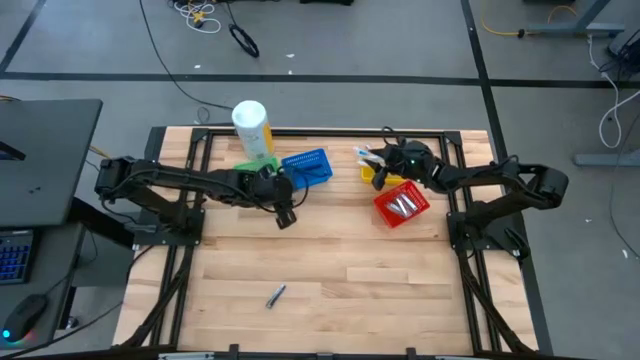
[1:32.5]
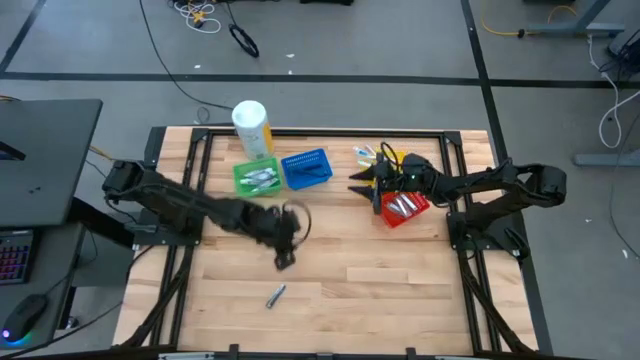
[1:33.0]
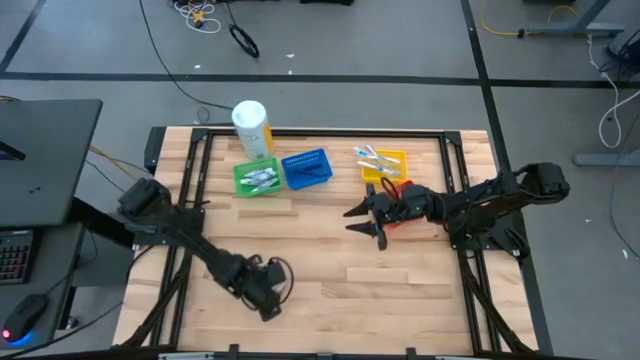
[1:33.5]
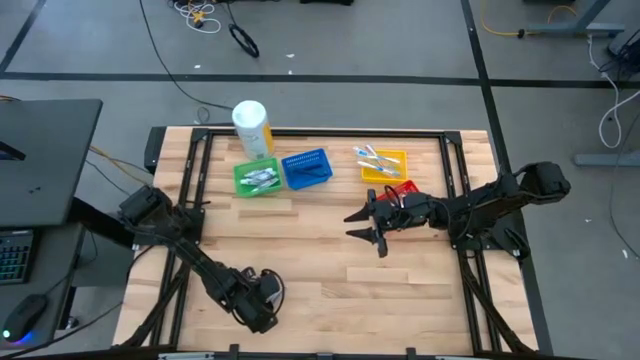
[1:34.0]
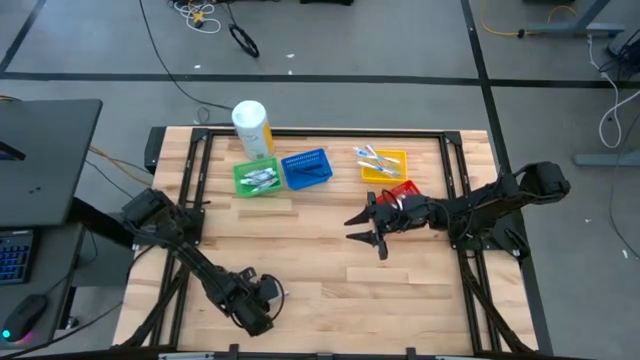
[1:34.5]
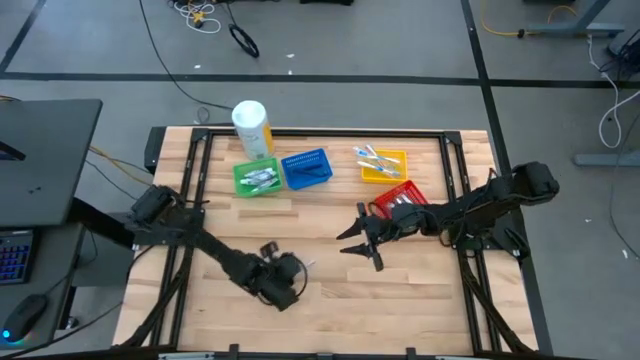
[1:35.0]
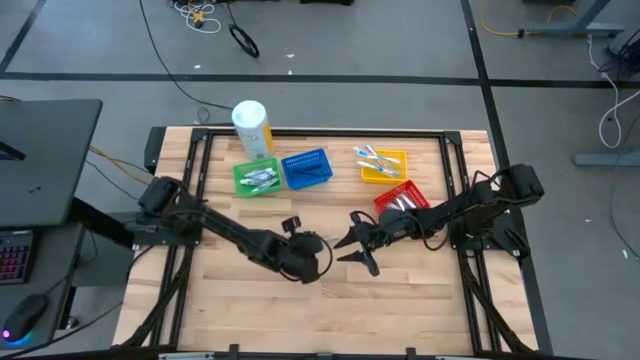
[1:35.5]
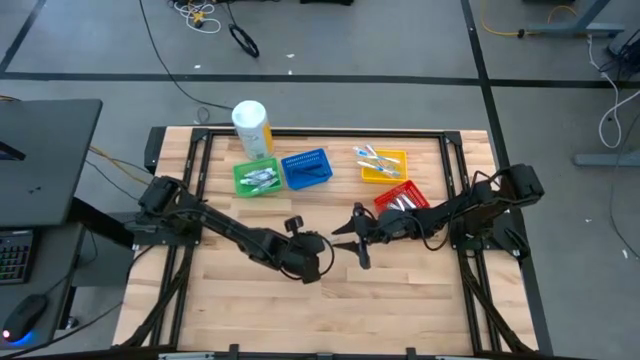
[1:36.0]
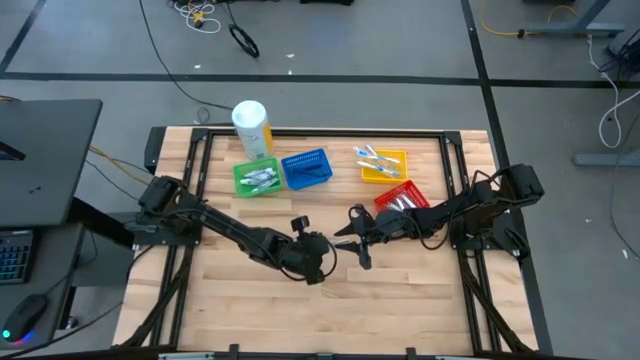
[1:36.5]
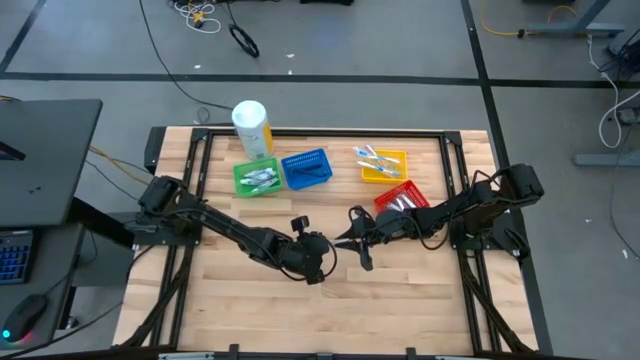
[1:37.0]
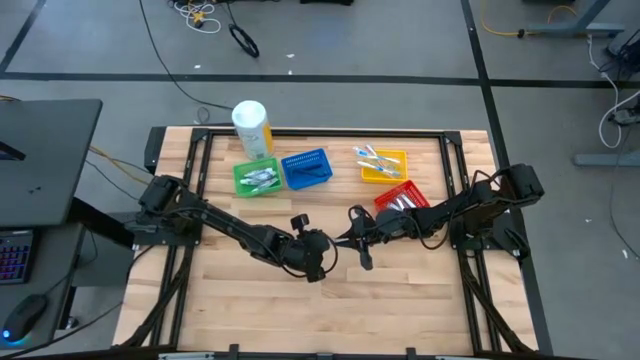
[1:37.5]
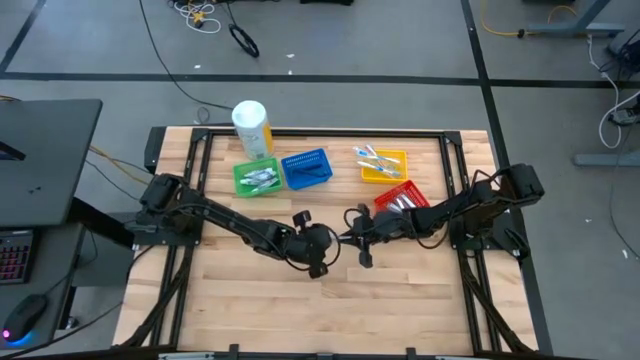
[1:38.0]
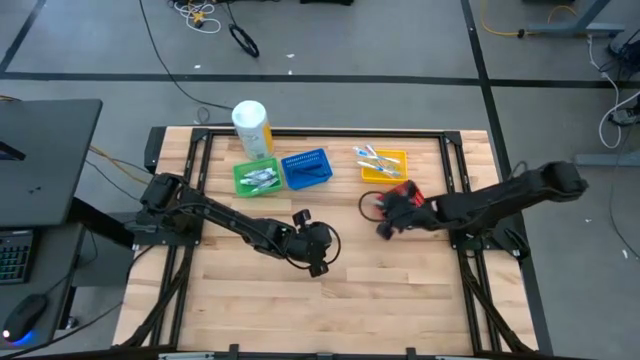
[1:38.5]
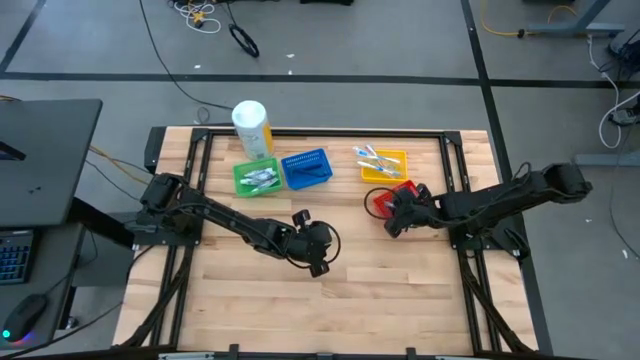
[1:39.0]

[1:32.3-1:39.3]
Task: Pick & Place Travel size toiletries
Put the silver nail cutter into the red bin

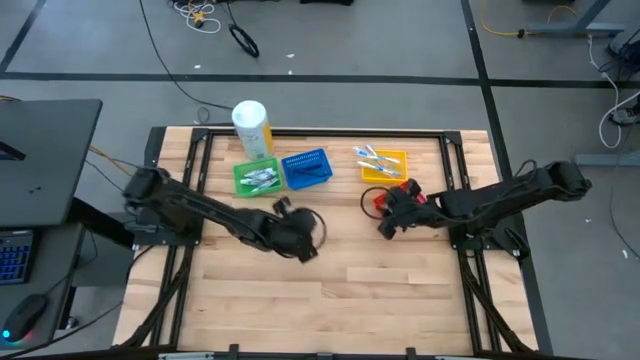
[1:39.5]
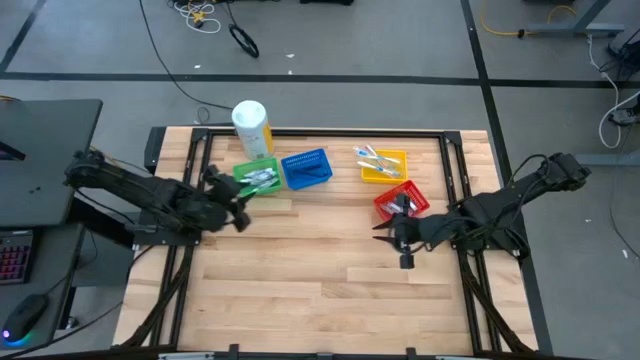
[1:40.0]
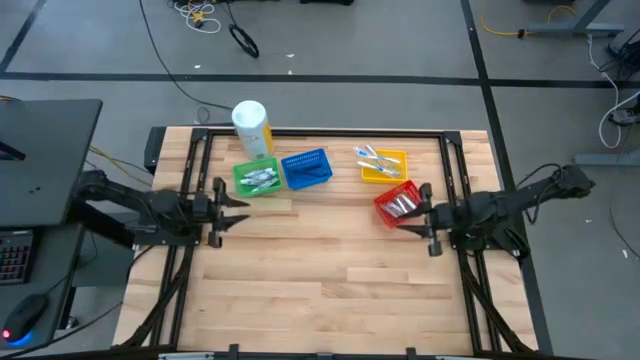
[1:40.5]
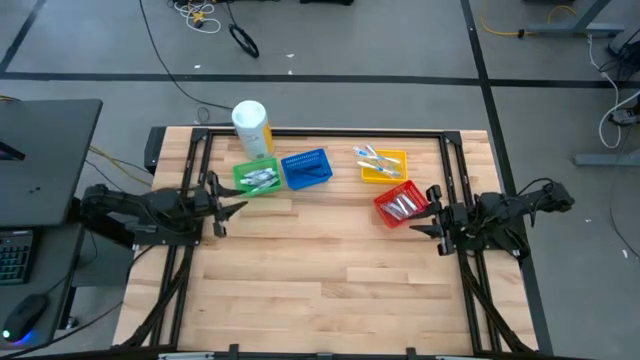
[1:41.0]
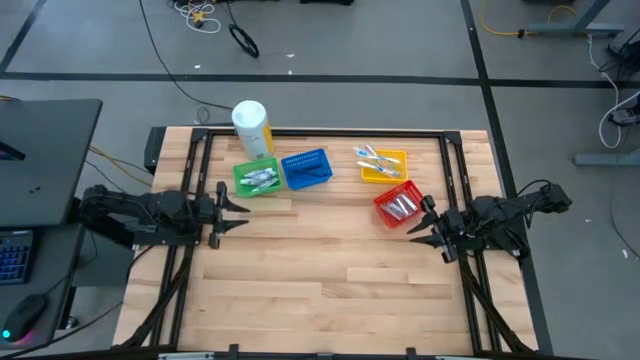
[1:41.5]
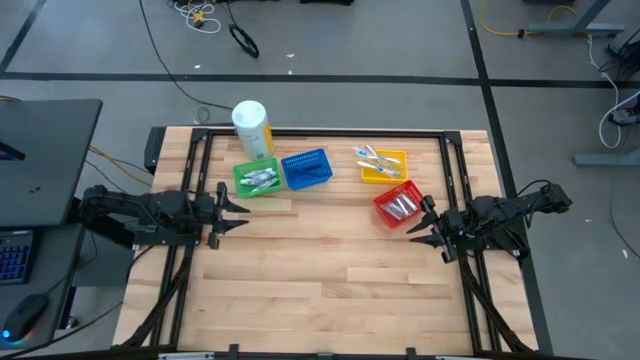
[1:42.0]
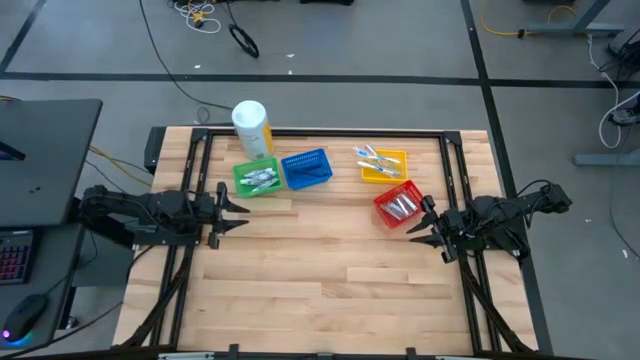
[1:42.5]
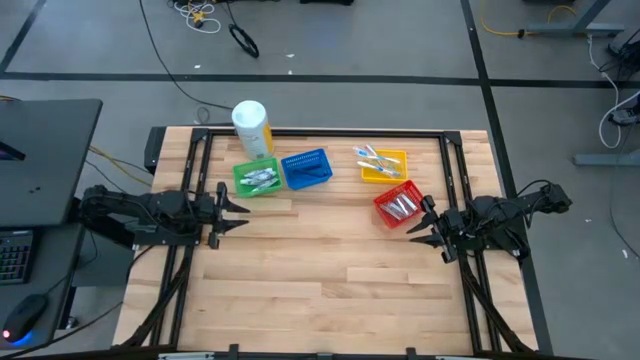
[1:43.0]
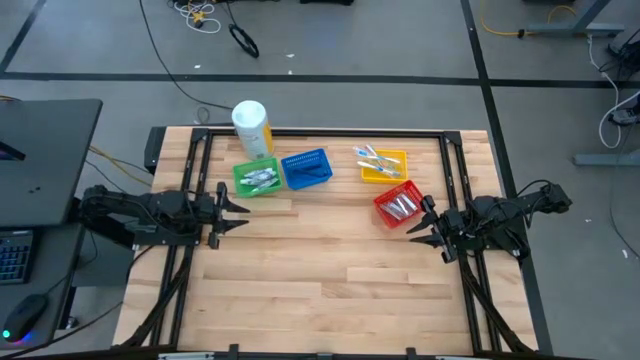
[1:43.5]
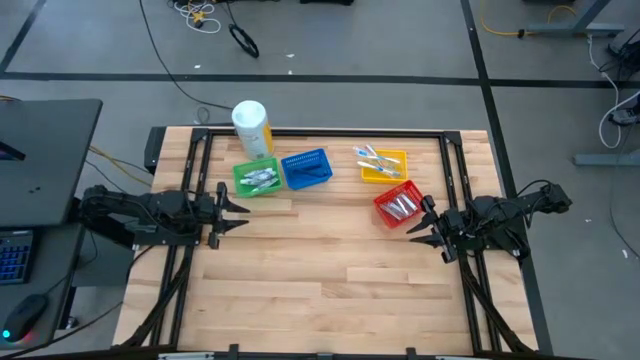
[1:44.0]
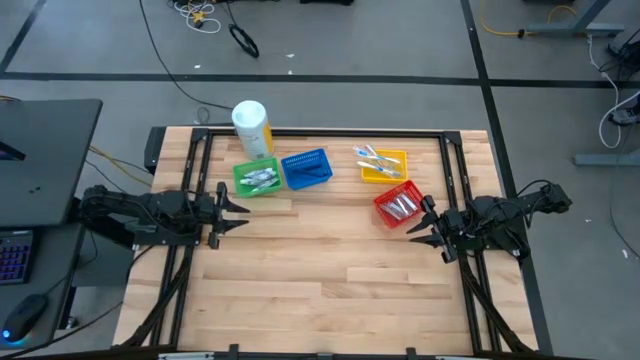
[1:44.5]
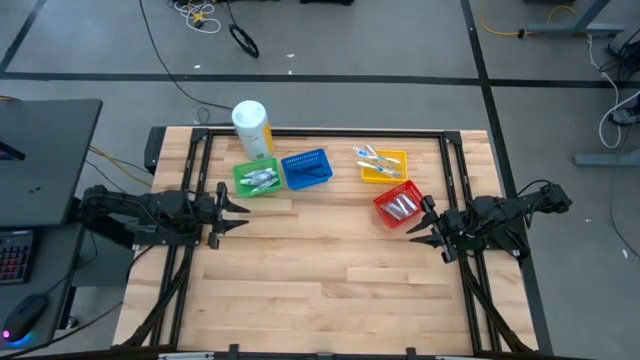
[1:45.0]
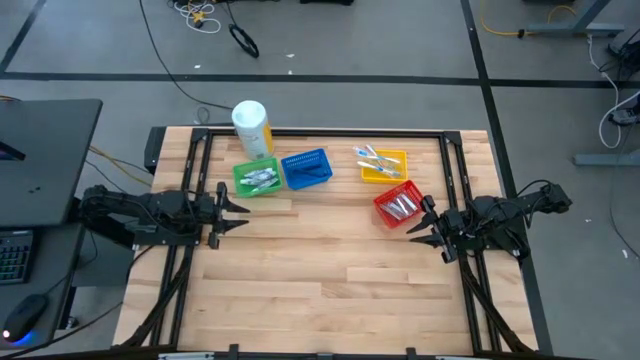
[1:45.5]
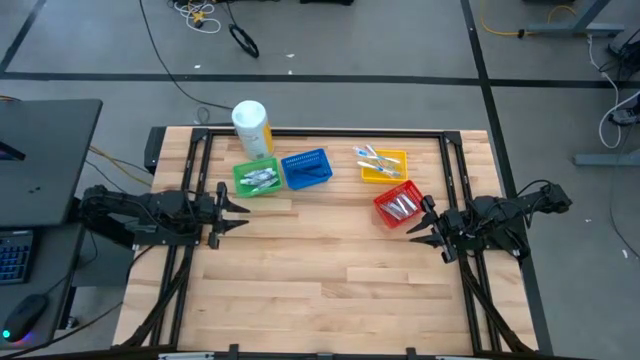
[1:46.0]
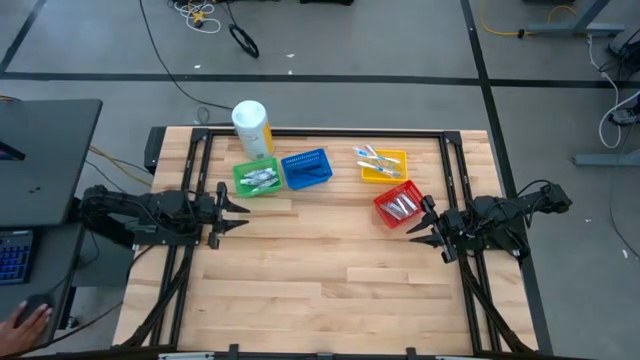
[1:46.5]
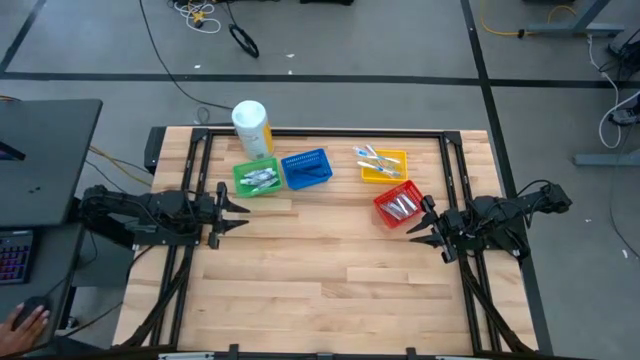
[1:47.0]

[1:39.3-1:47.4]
Return to Home Position

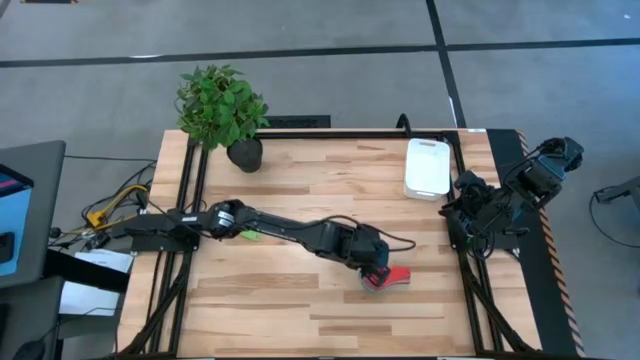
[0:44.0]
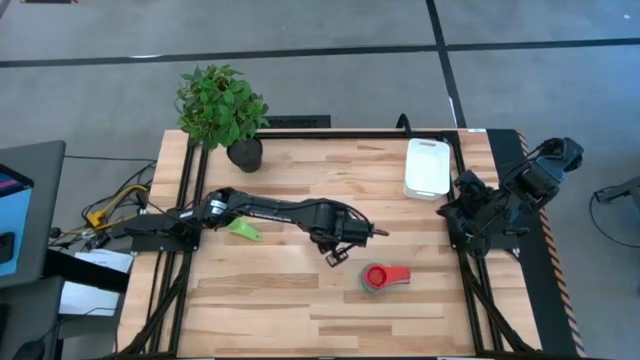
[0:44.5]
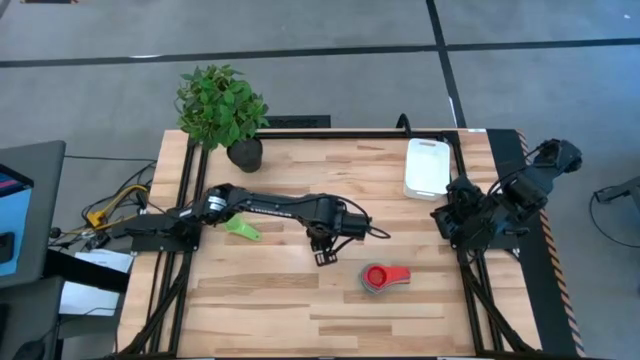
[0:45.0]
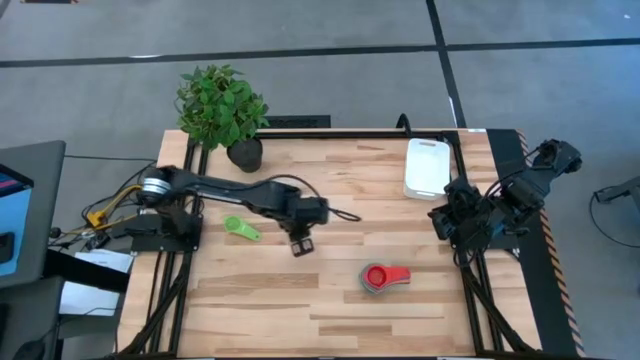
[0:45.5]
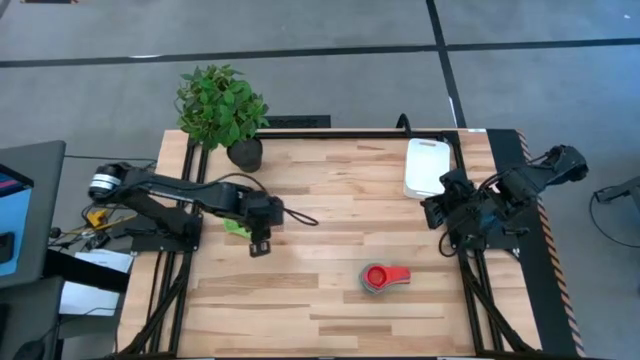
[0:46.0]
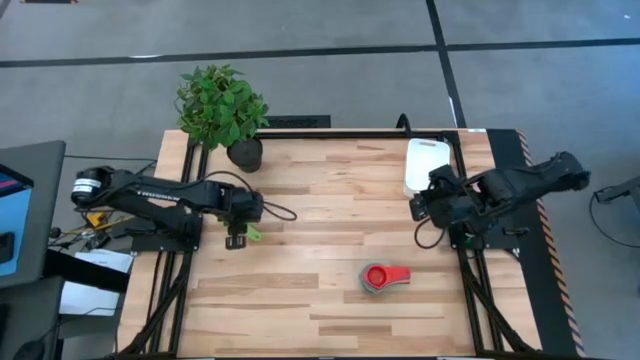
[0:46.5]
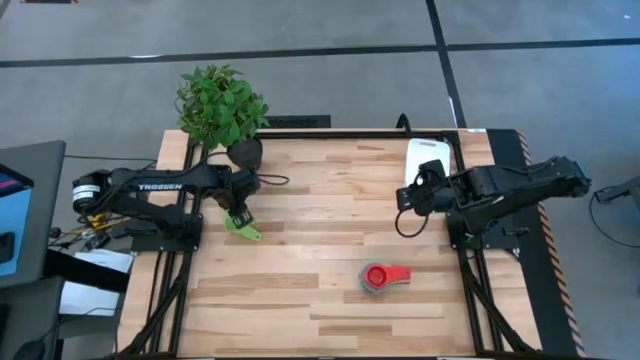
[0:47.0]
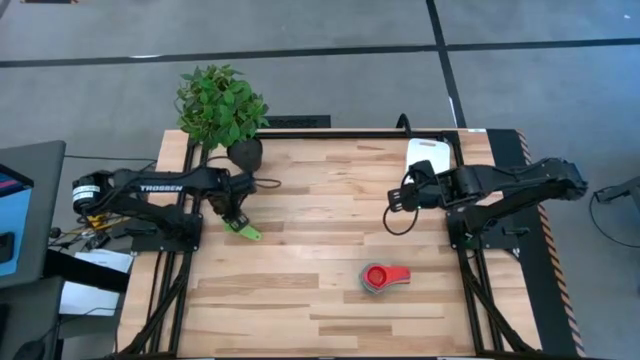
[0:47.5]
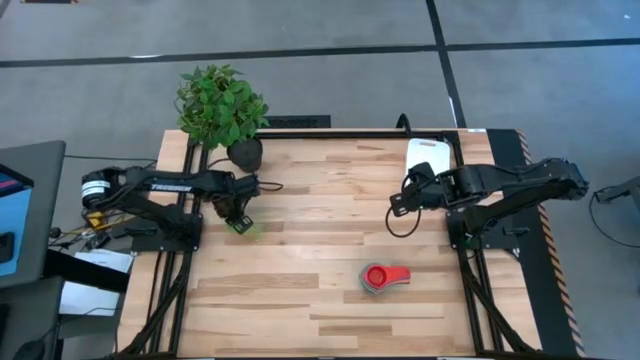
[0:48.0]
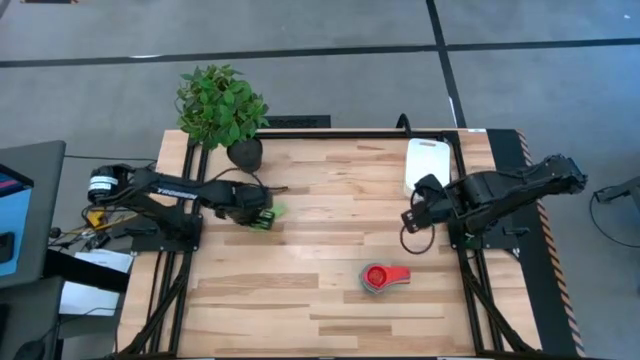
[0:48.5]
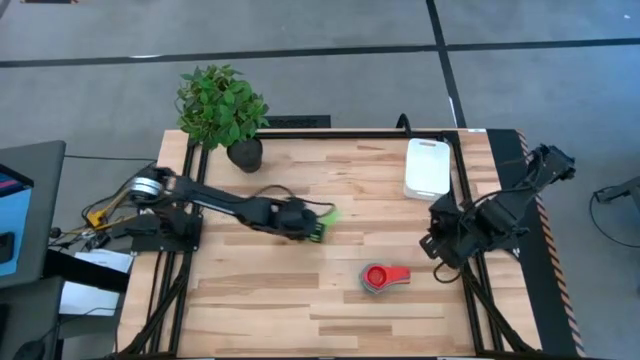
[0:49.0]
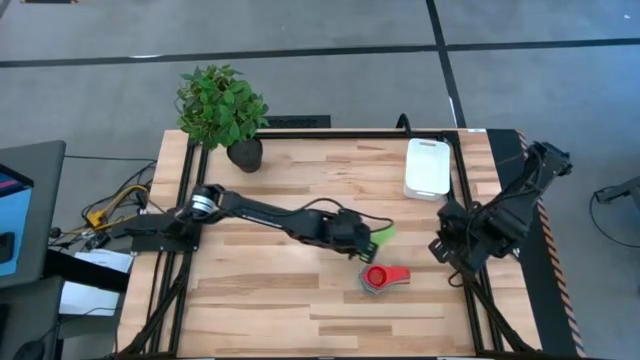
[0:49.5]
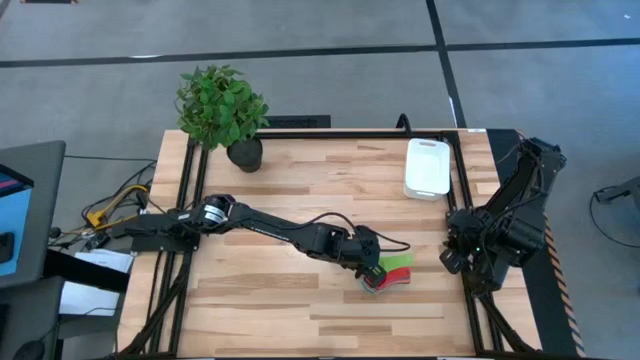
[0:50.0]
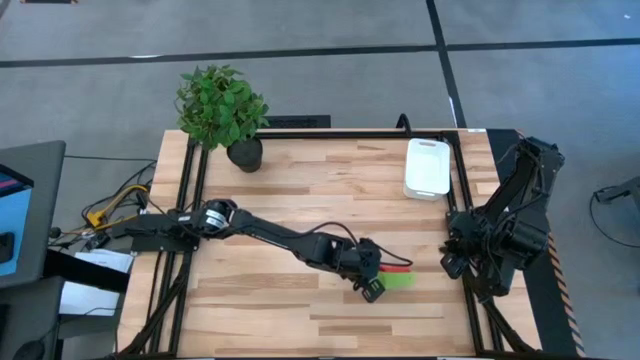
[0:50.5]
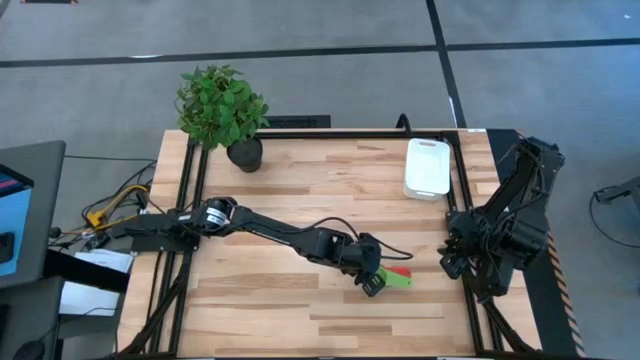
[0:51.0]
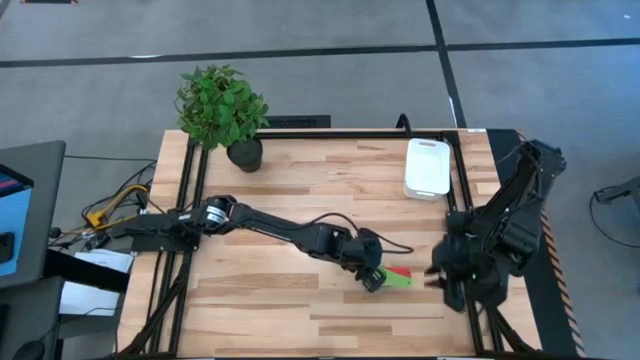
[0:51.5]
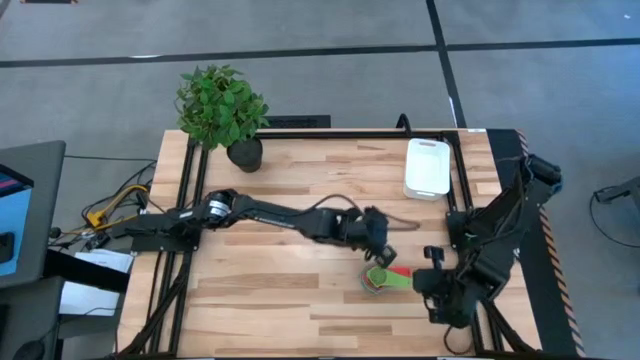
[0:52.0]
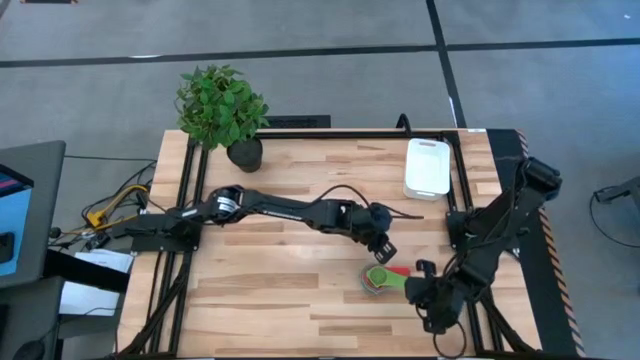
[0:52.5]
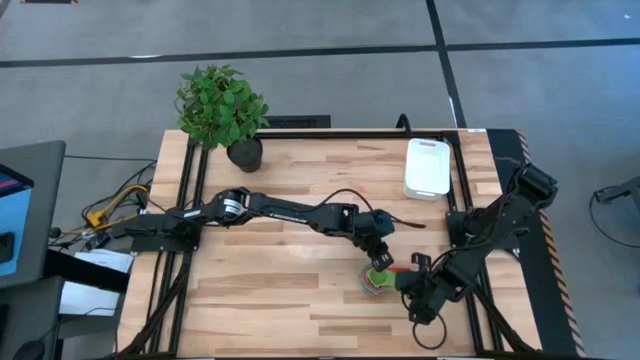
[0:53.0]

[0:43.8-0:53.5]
Task: Nest measuring cups in basket
Stack the green measuring cup on the red measuring cup
